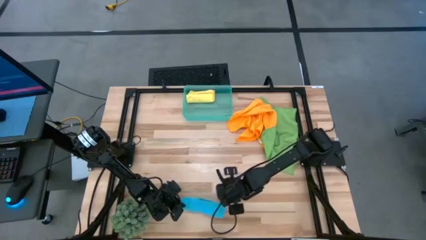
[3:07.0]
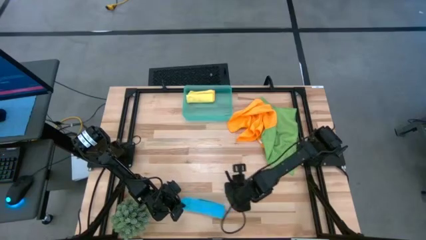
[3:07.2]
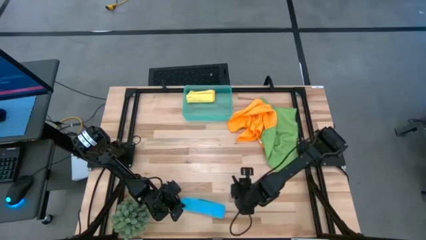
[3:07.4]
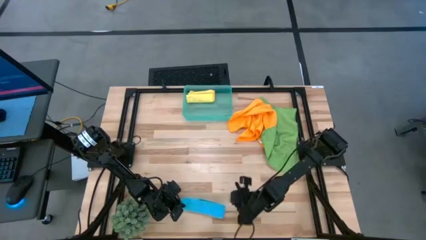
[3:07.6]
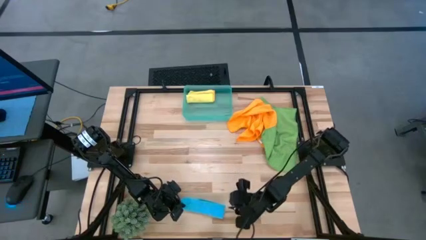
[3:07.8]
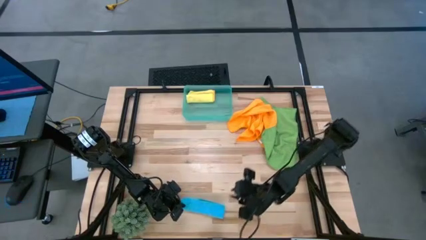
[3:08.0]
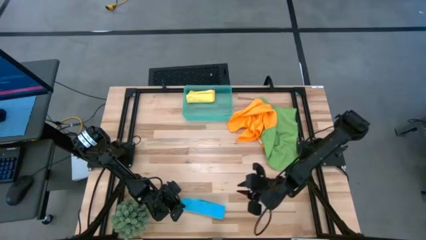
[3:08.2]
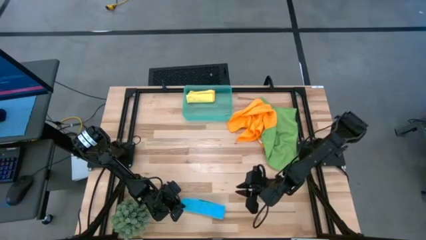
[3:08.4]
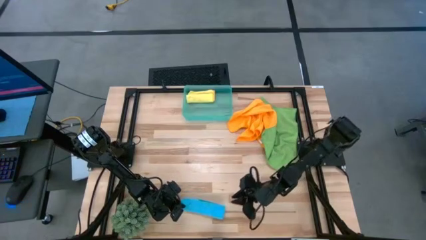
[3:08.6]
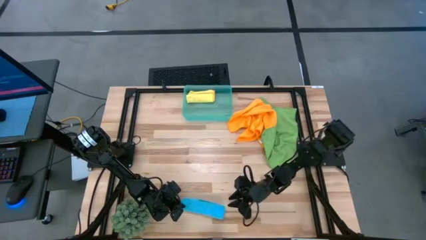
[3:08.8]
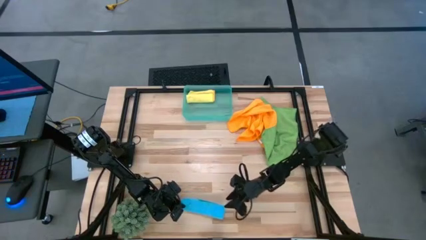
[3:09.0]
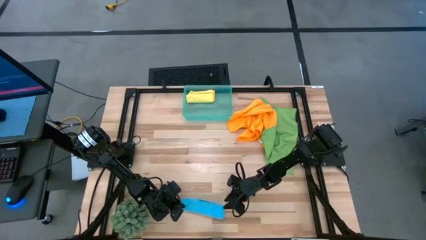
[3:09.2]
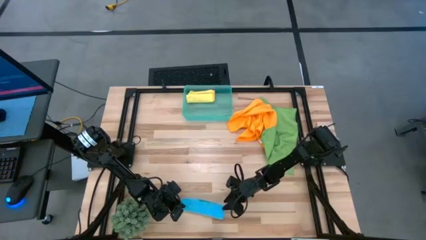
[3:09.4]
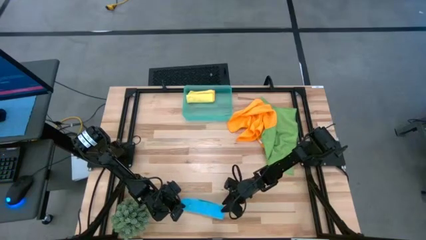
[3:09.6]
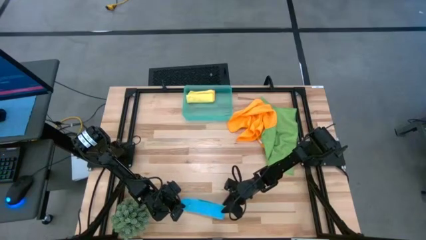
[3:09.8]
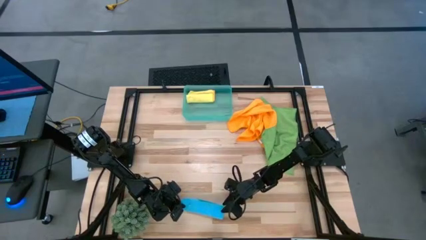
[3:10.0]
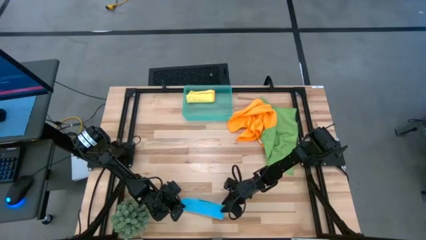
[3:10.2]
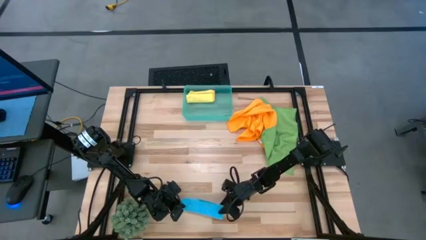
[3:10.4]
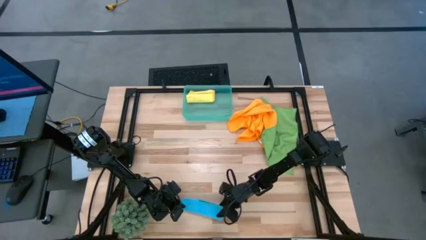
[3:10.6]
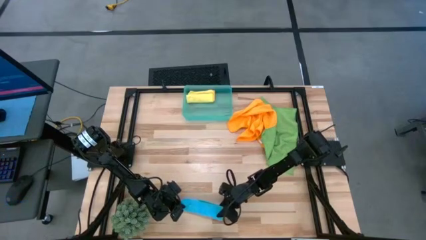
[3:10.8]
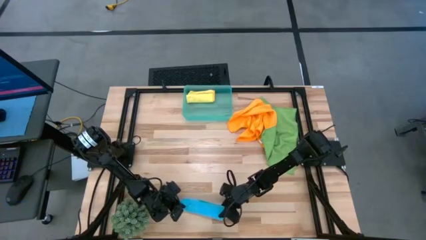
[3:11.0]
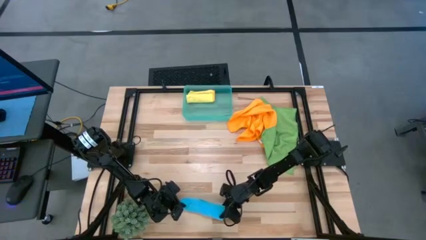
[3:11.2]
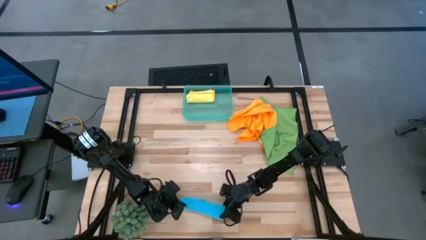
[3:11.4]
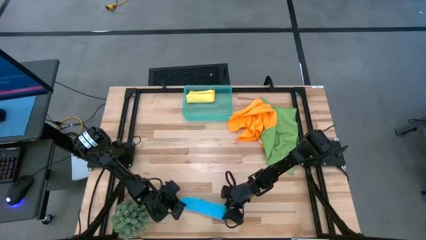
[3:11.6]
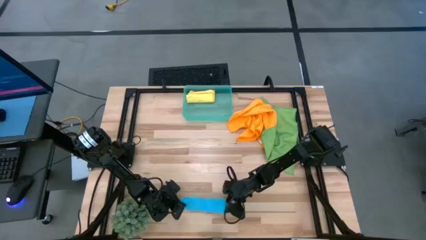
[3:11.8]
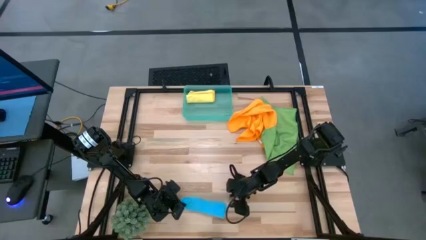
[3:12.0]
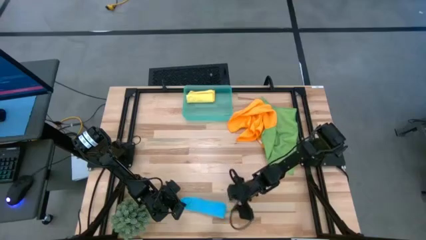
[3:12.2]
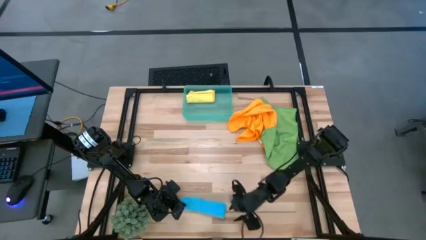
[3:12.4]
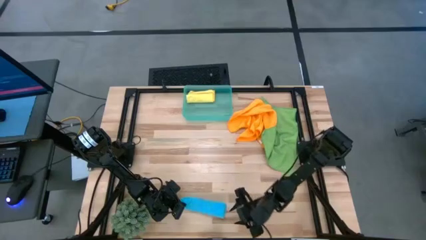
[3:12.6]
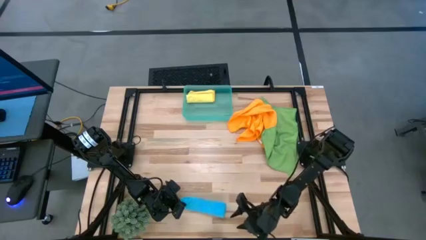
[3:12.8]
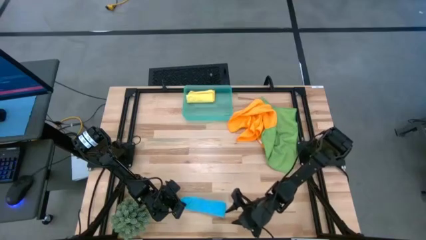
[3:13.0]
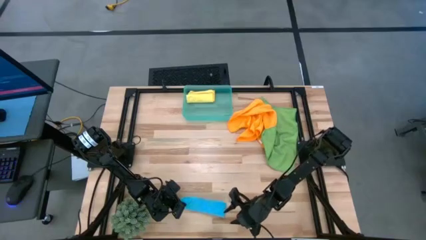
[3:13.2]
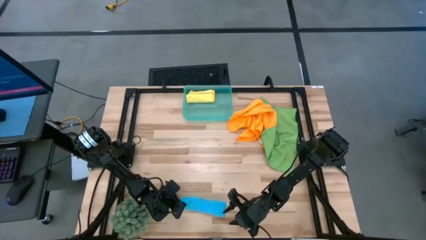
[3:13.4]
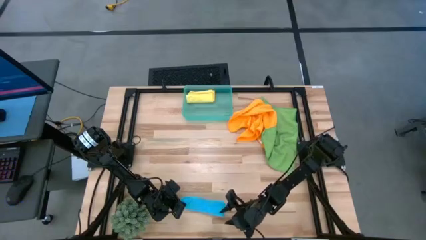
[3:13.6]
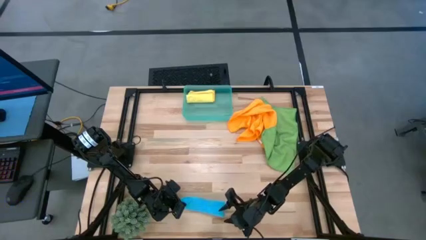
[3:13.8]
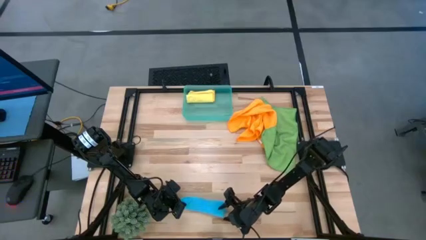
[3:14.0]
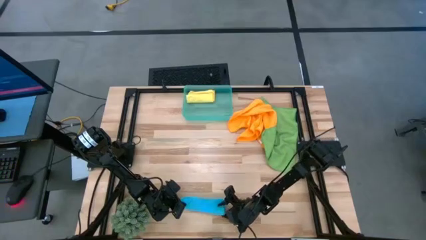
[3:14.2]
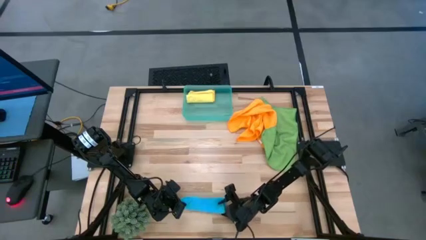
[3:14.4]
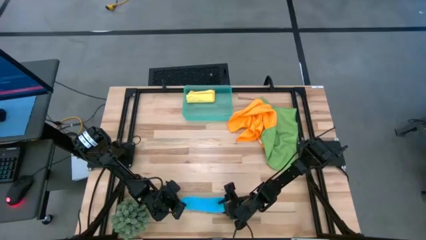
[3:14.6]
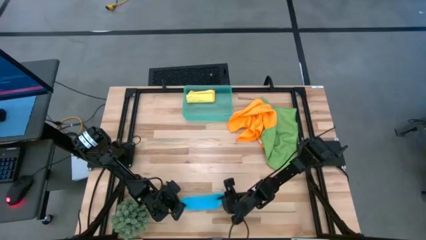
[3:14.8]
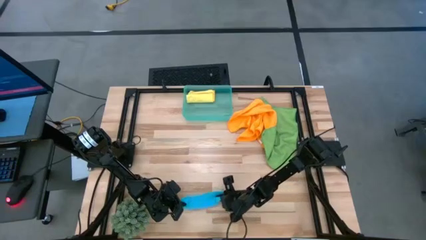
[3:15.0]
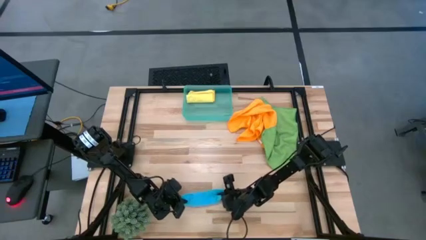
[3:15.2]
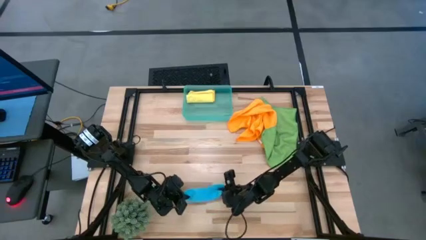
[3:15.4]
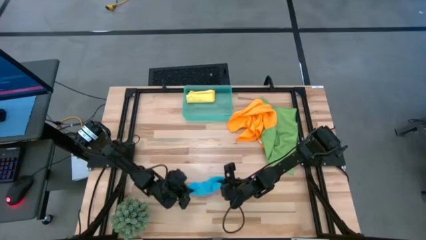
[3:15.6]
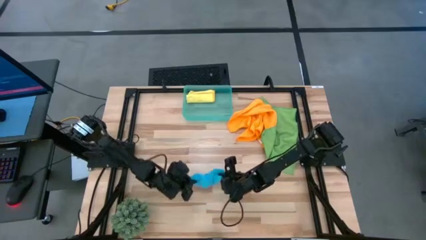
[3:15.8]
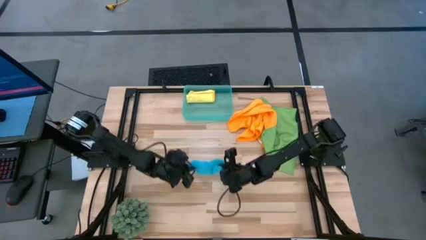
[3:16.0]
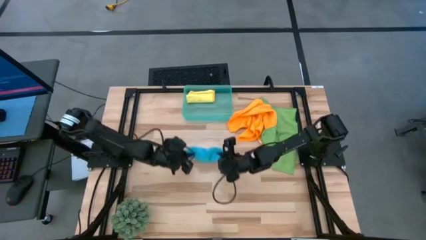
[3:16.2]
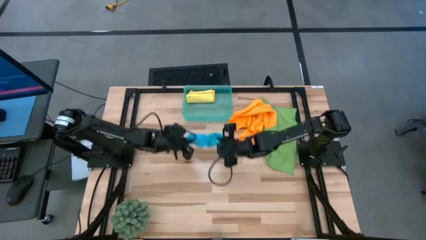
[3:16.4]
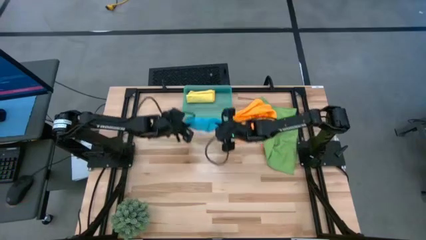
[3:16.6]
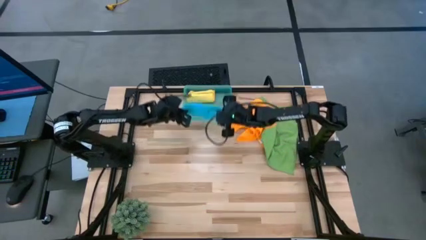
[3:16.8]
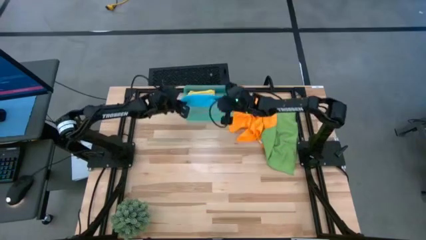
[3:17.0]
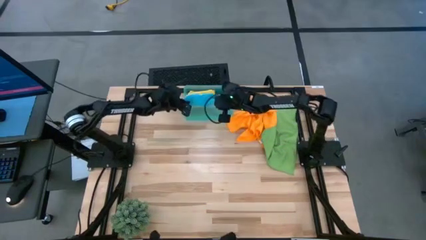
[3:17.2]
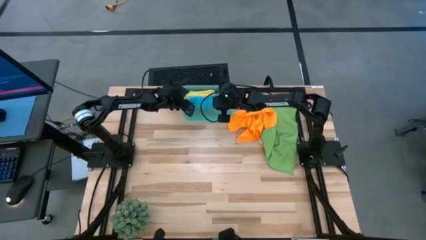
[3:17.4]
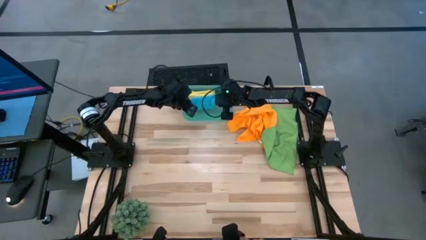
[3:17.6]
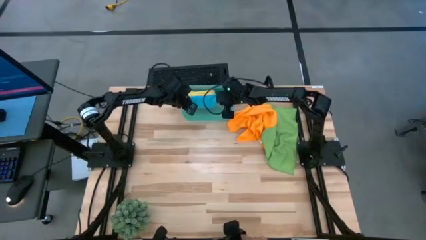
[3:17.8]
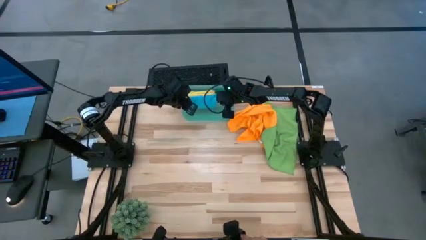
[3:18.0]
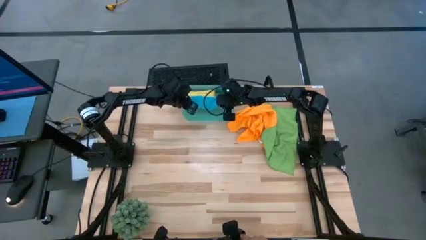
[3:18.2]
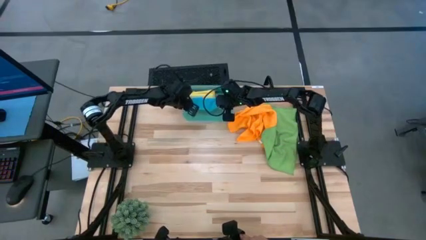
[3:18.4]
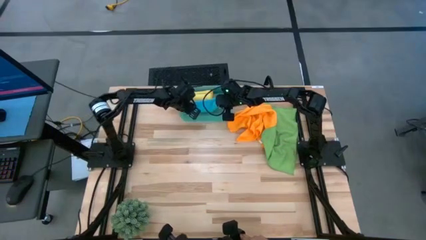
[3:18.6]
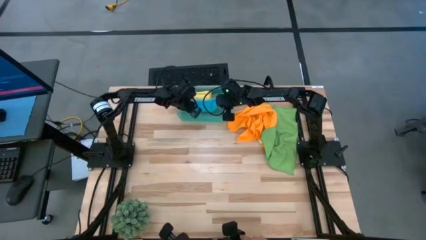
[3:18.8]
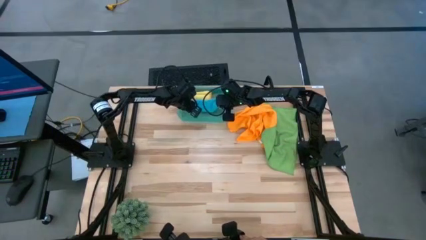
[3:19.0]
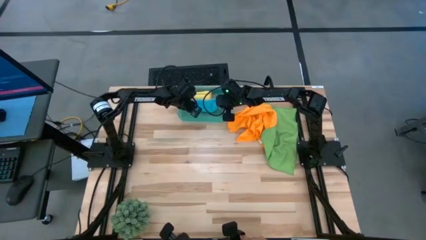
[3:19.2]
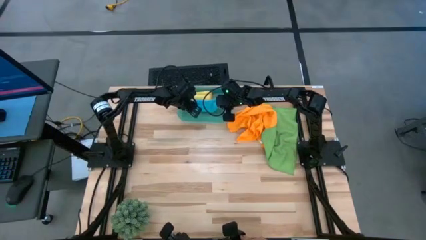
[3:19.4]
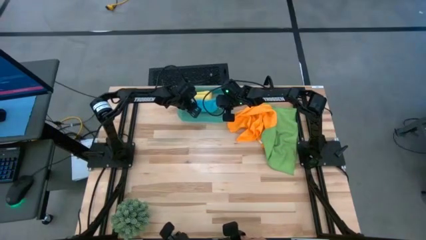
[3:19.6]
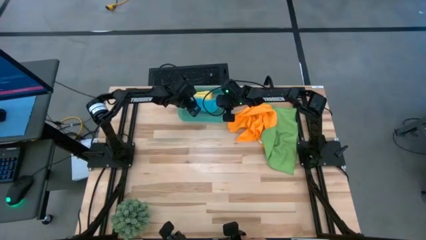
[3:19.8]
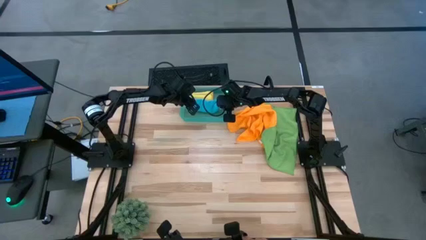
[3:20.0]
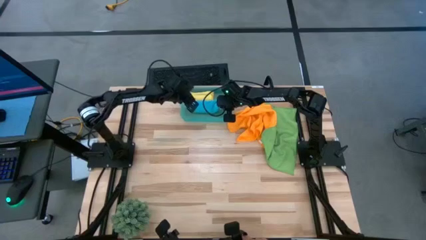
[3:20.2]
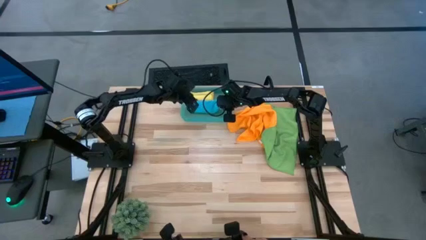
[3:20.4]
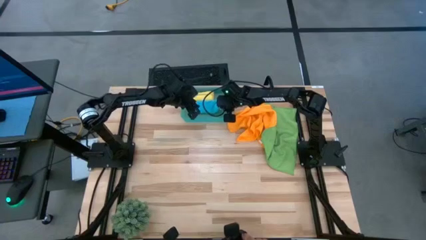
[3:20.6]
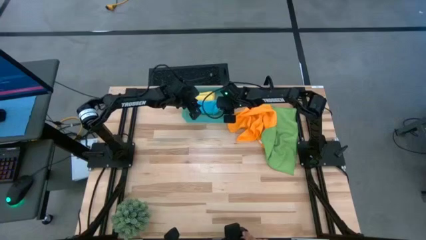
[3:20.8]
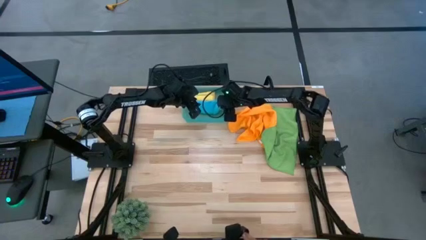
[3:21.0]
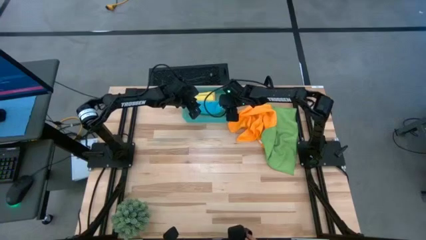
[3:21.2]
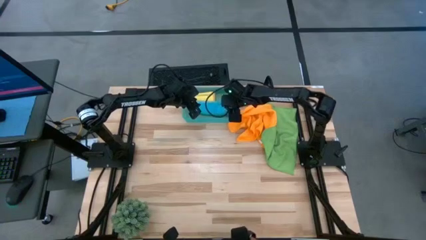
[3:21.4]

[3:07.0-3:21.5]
Task: Roll microfiber towels into tight, uniform cylinder then place into a basket
Put the rolled blue microfiber towel into the green bin
